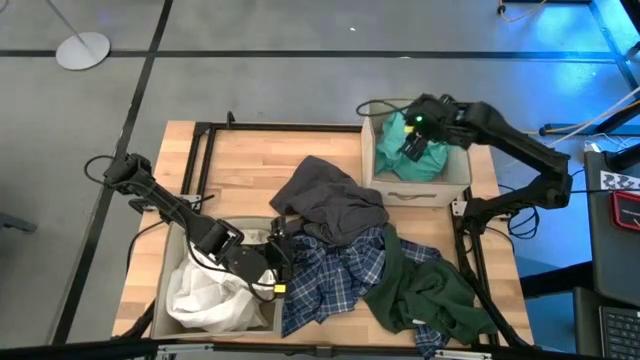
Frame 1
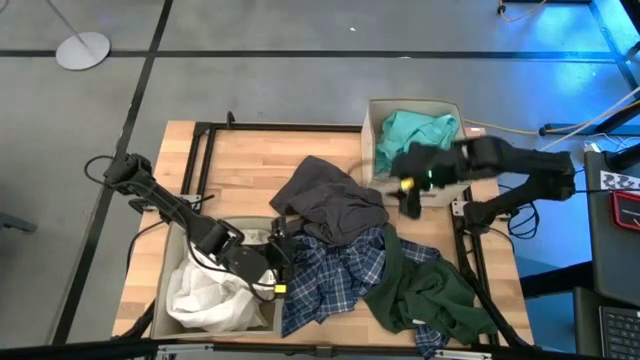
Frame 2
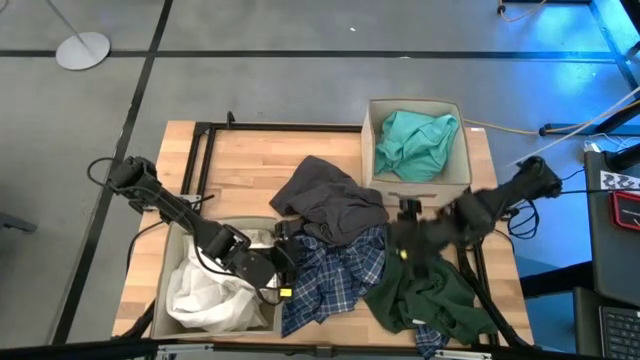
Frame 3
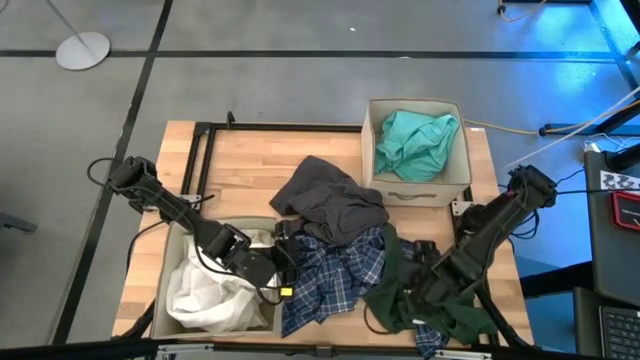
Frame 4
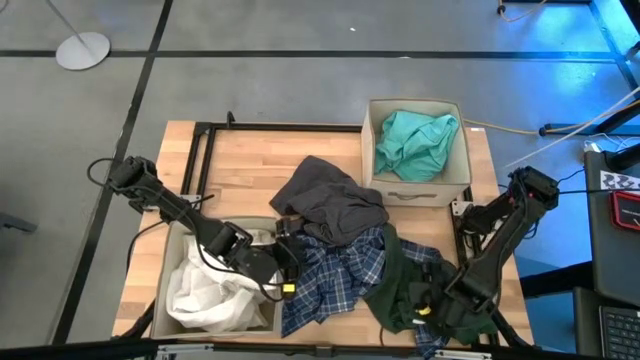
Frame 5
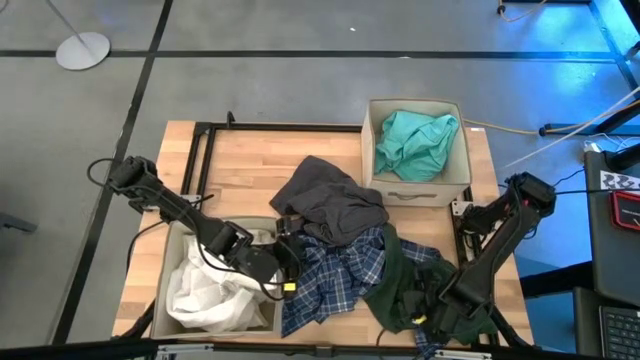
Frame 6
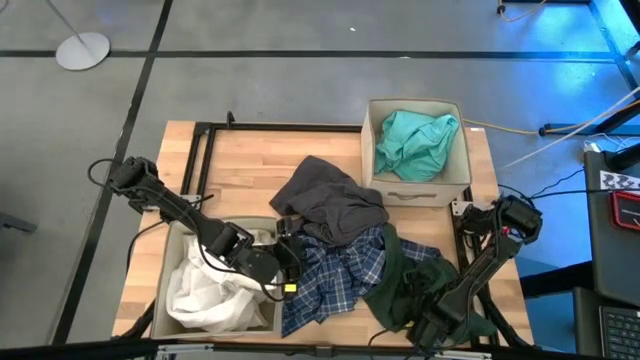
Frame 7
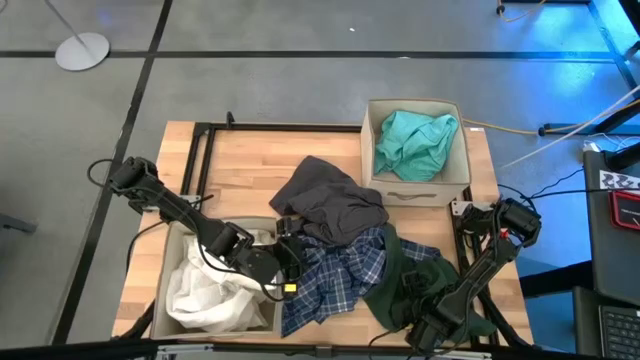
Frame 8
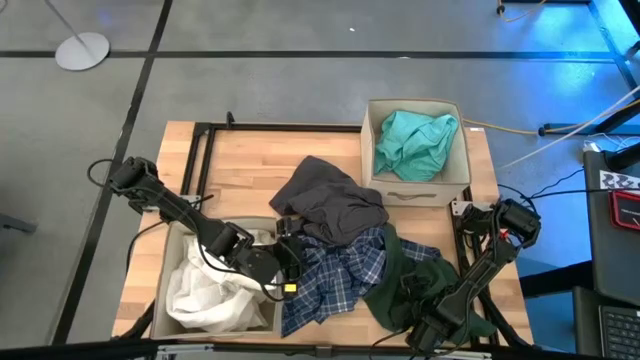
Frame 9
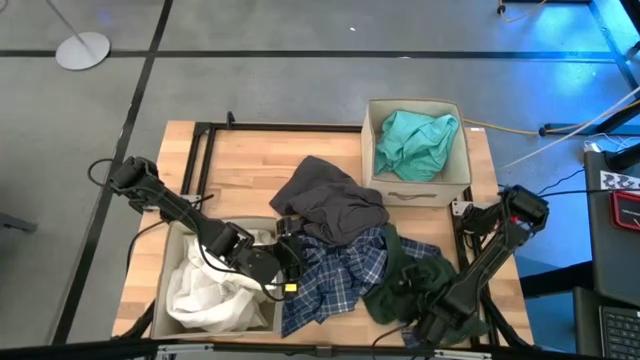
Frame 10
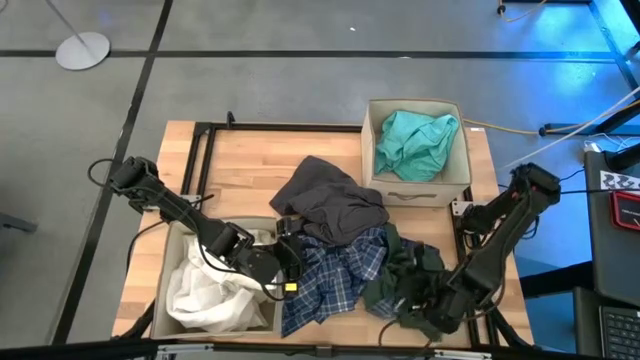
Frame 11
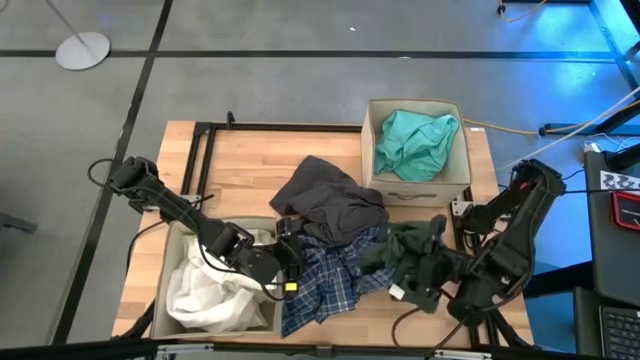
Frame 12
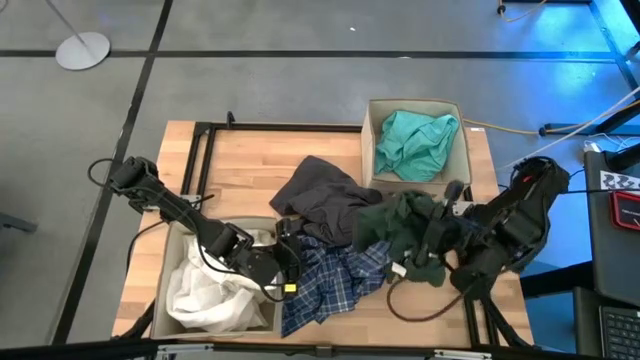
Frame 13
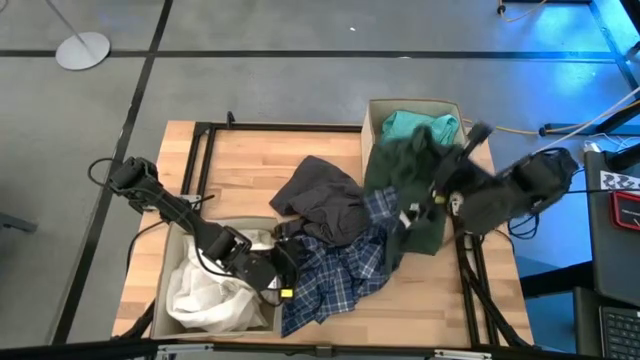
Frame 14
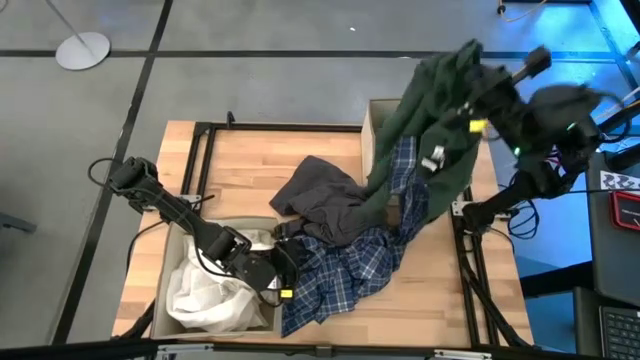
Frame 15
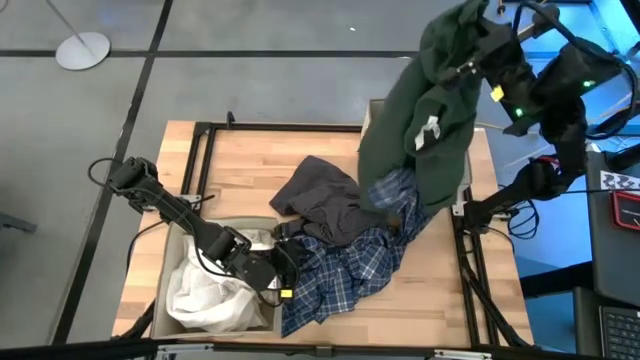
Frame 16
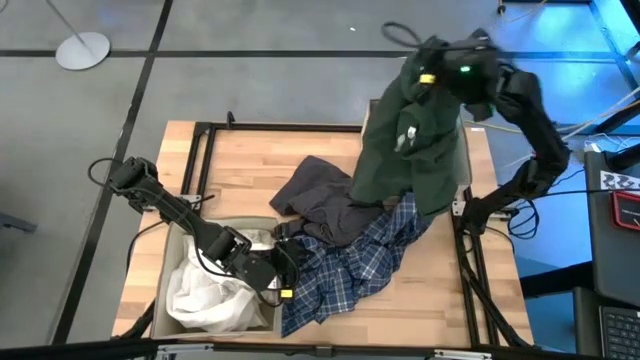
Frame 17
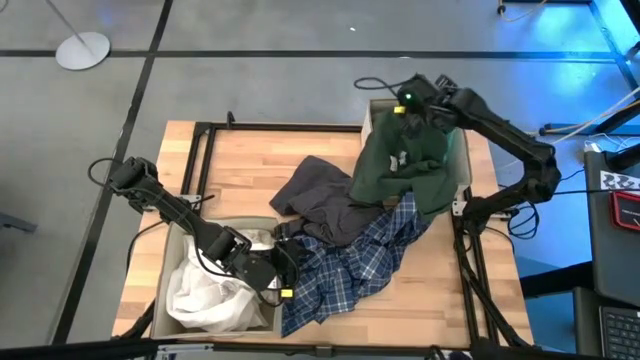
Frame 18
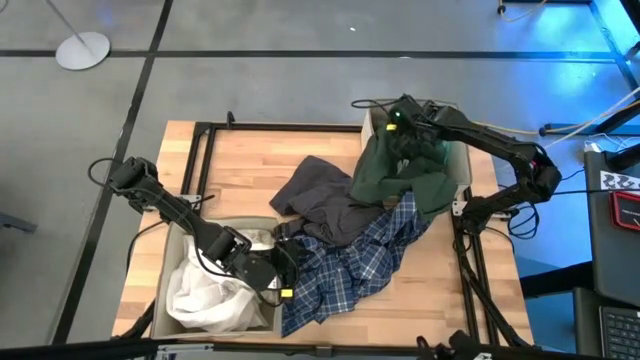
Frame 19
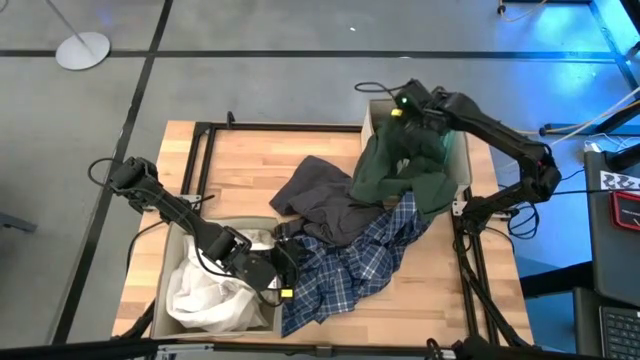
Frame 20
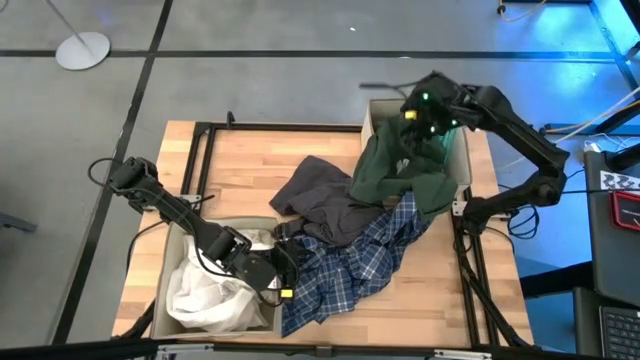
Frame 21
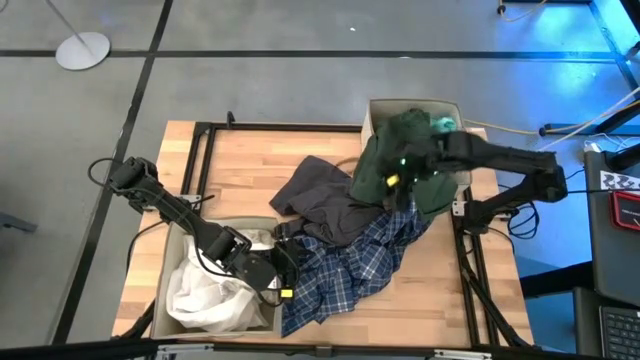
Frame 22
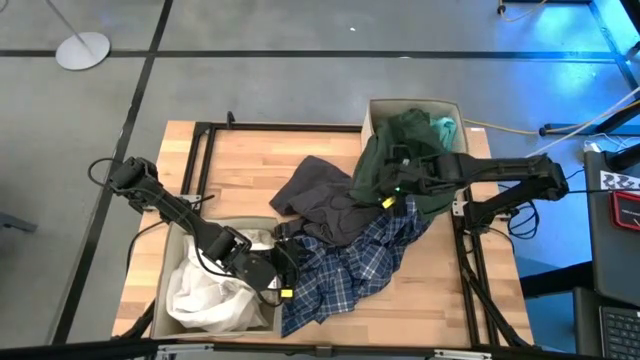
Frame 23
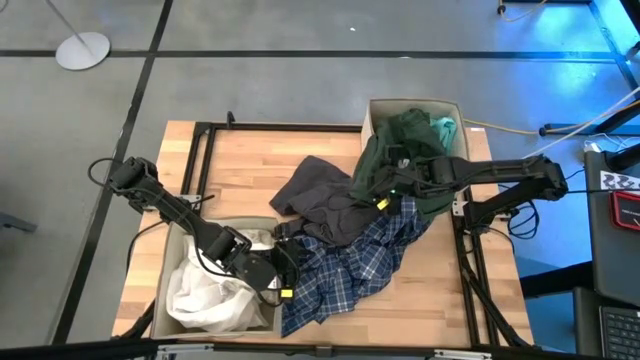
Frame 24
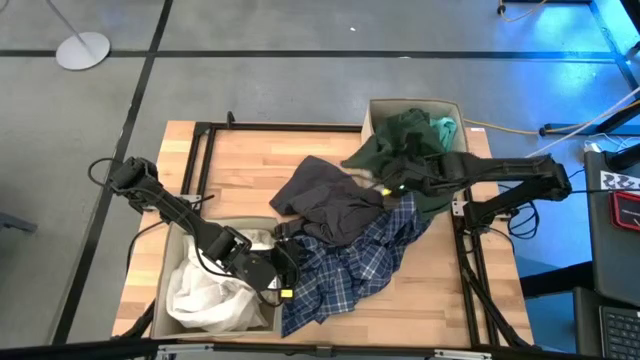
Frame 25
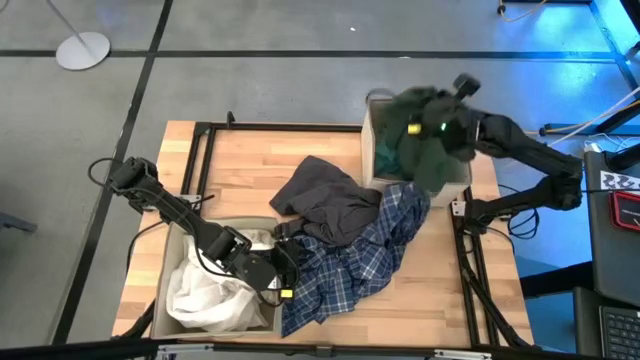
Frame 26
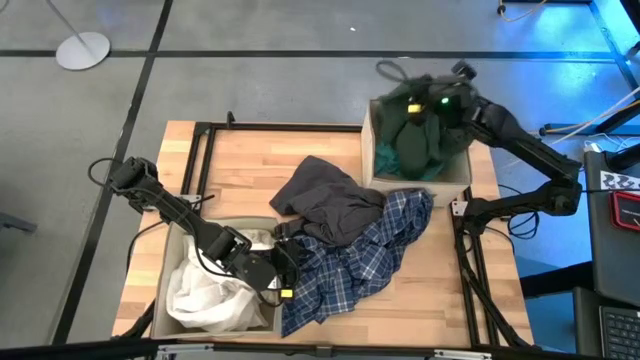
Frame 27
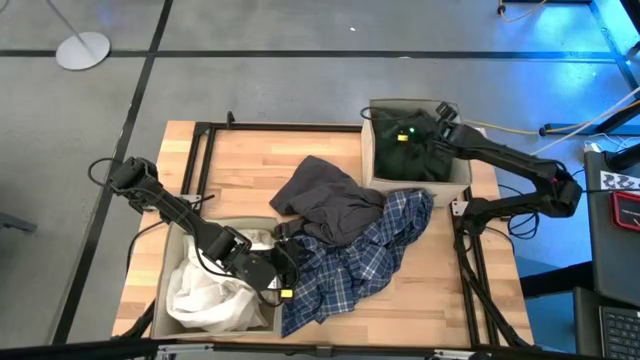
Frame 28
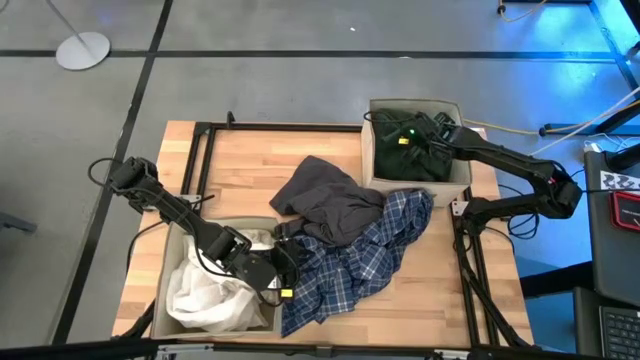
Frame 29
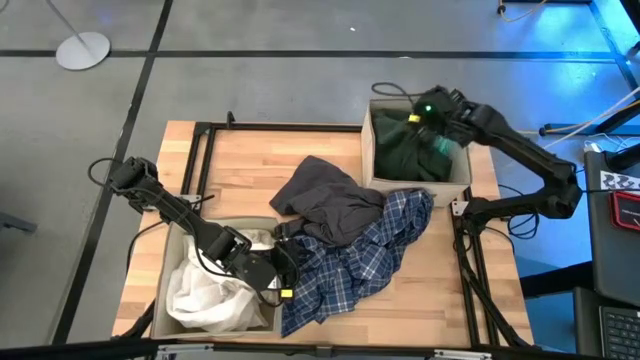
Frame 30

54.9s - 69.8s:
Task: Sort clothes
Put the green shirt into the top brown laundry bin

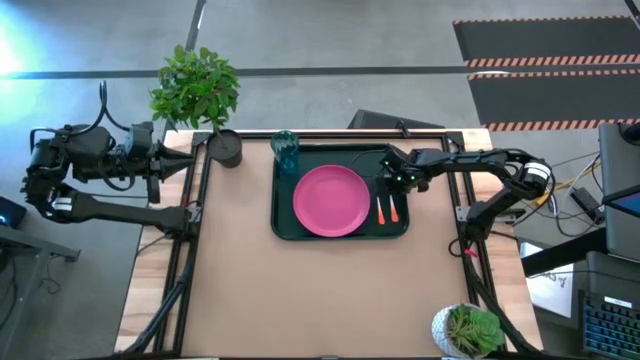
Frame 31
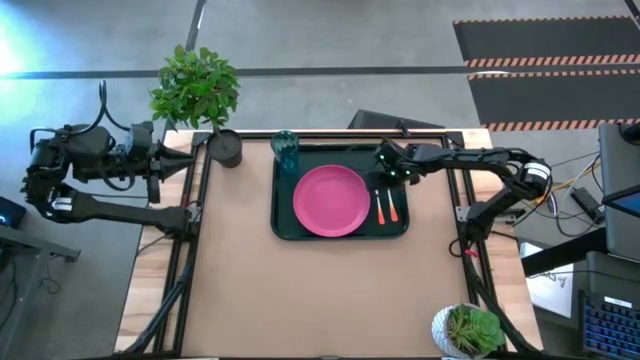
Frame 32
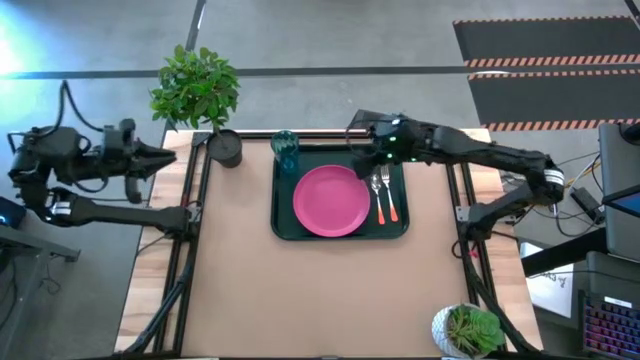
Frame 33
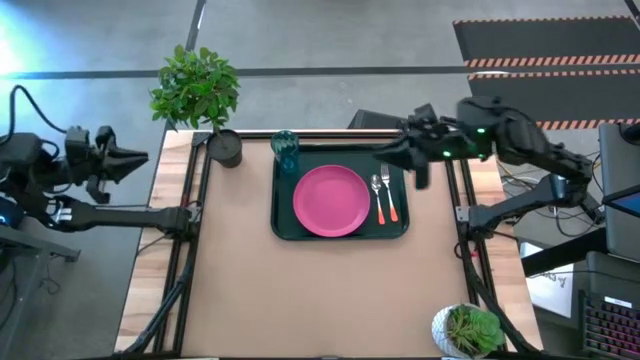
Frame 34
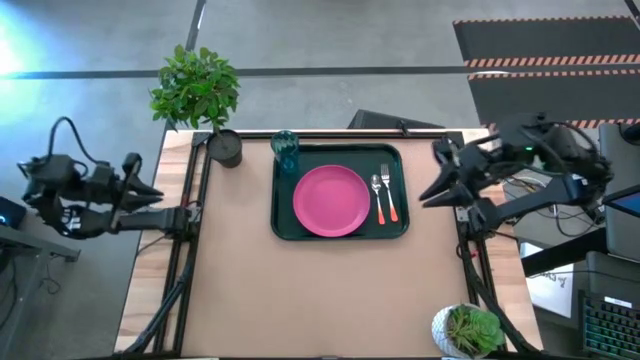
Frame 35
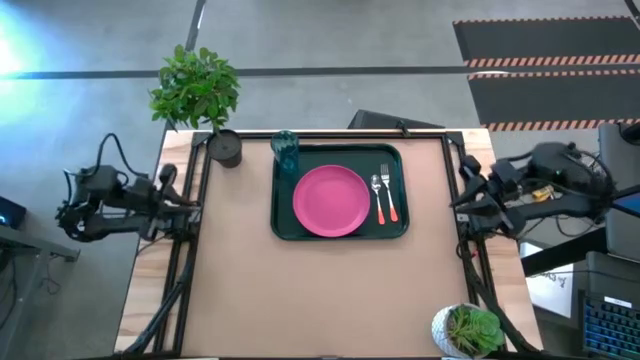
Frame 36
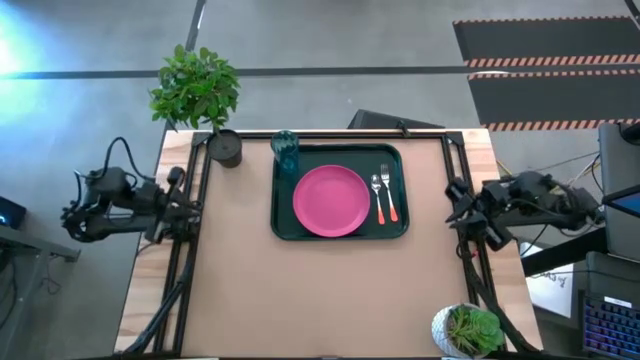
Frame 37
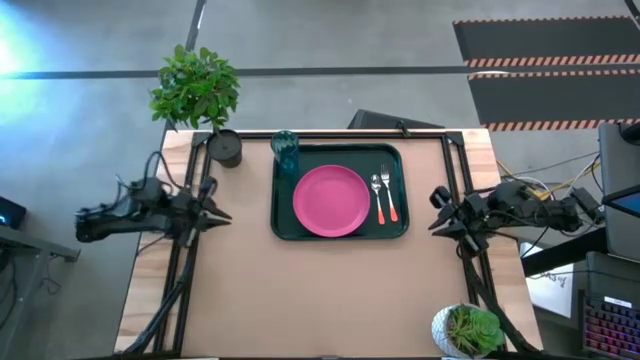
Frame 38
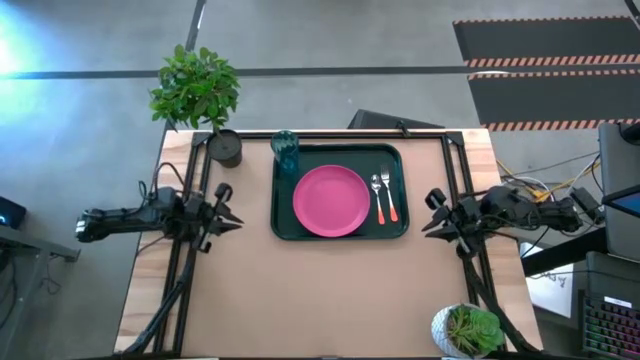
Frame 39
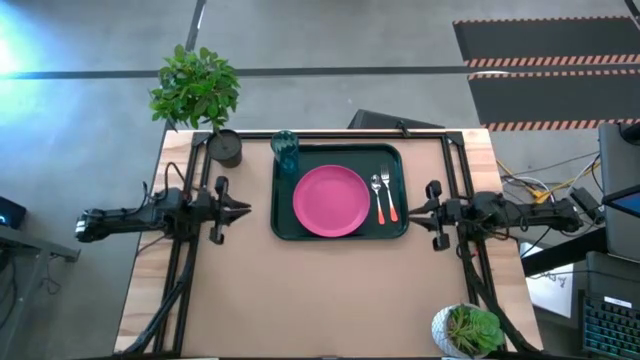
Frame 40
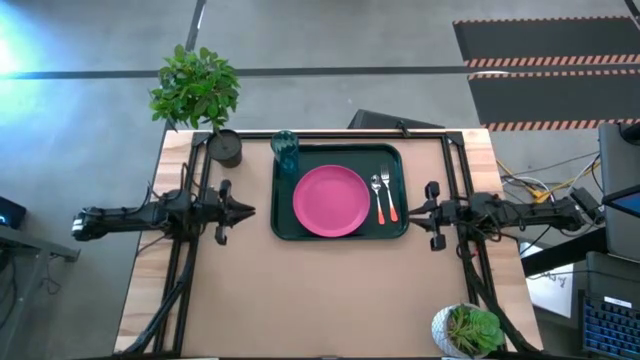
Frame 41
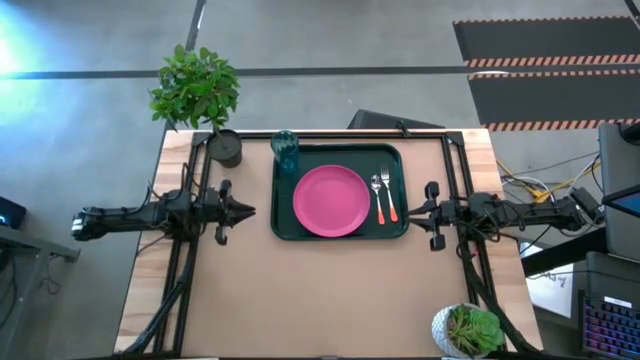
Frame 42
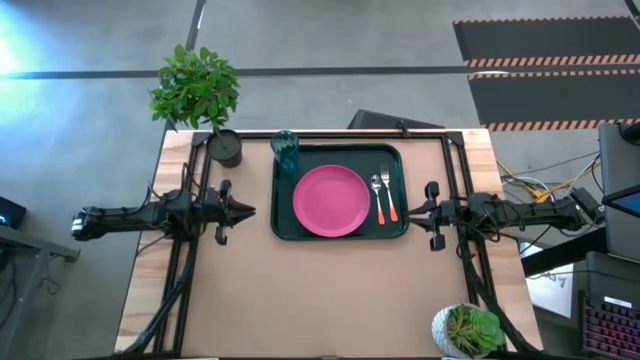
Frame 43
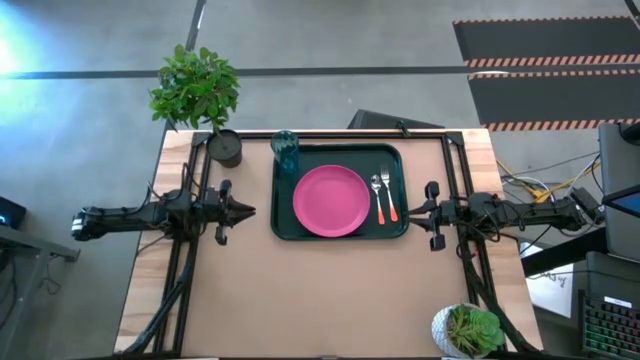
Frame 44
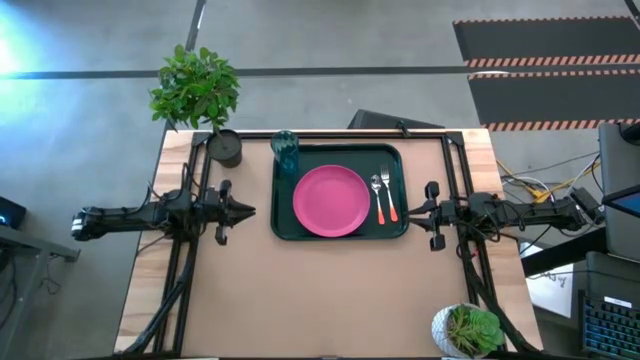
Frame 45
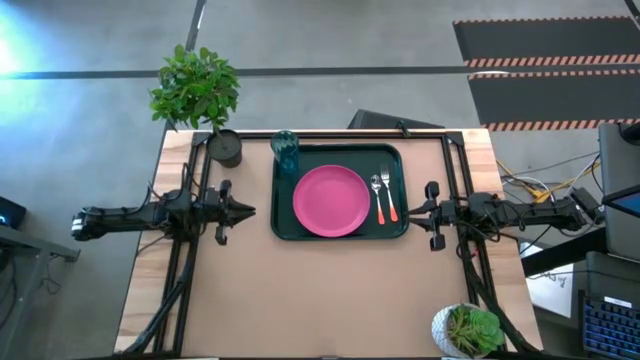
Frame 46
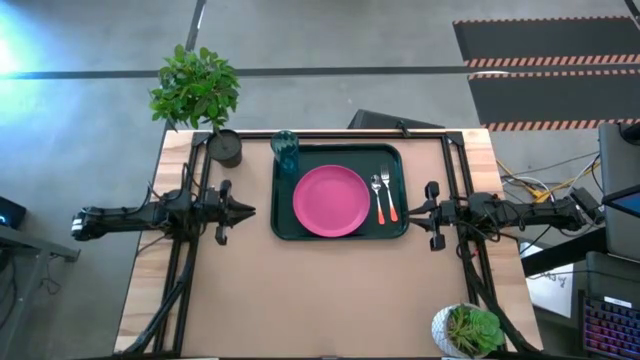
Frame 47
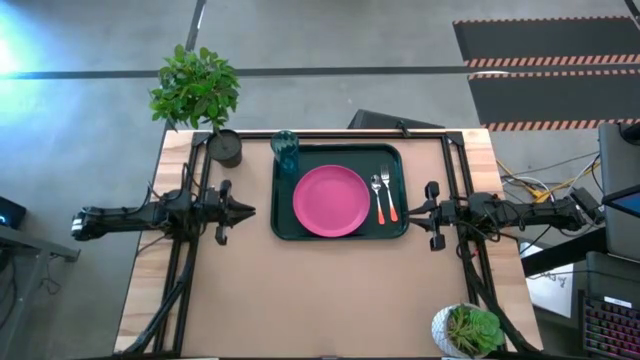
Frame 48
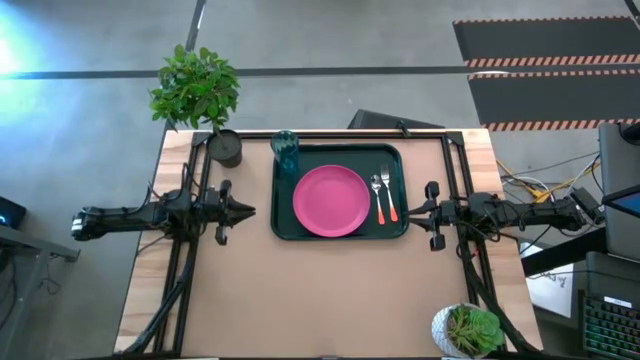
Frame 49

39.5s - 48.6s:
Task: Pick and place plate/cup/fork/spoon on tray
Return to Home Position
